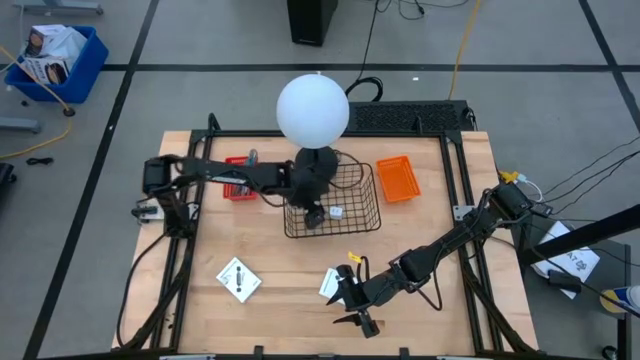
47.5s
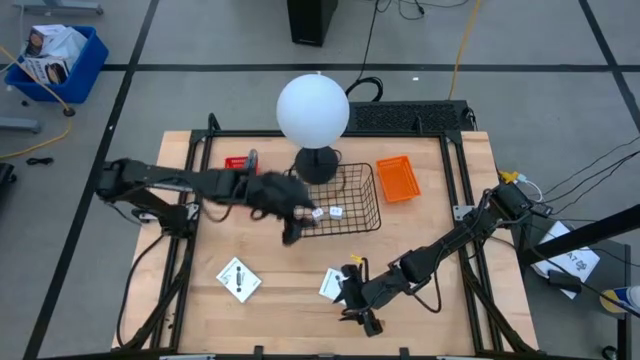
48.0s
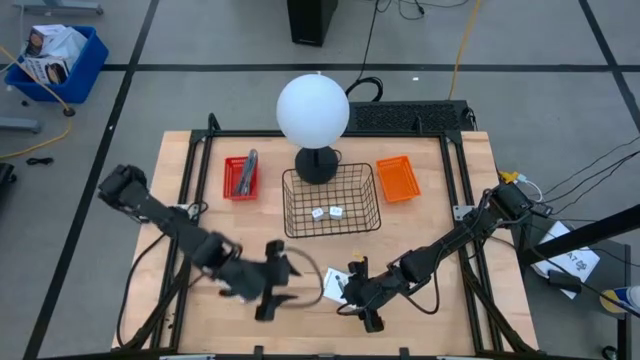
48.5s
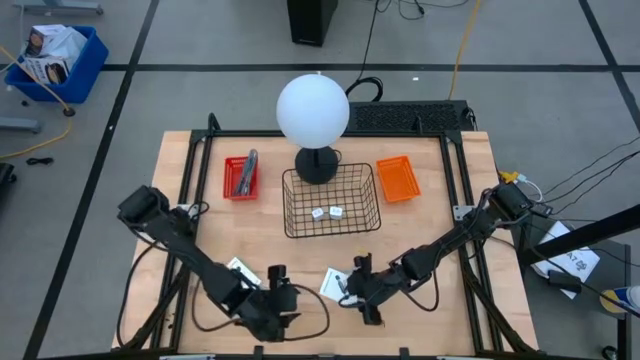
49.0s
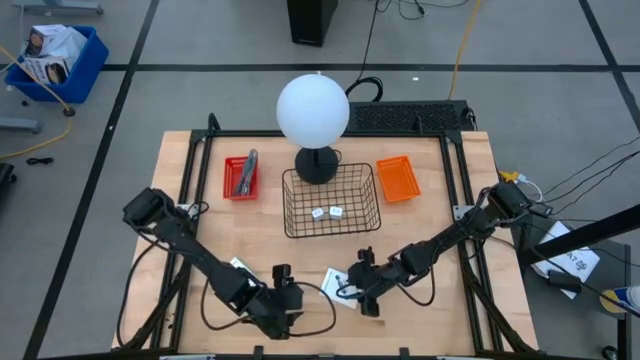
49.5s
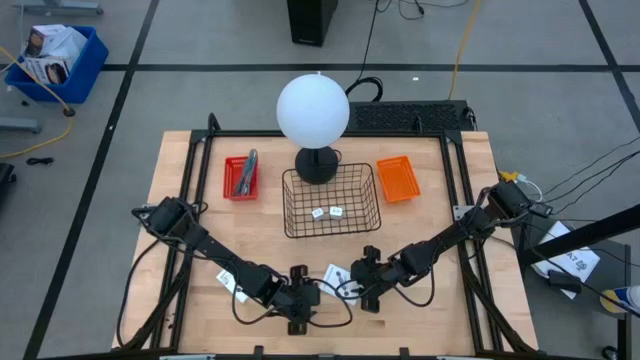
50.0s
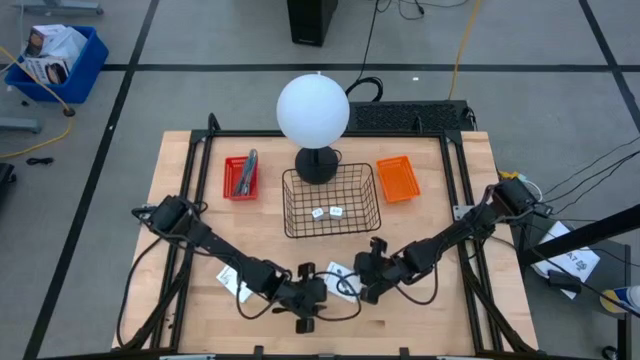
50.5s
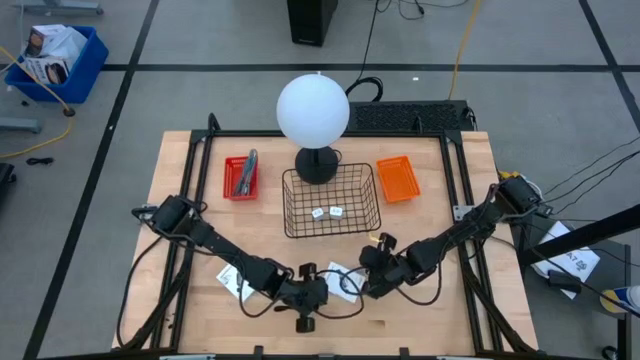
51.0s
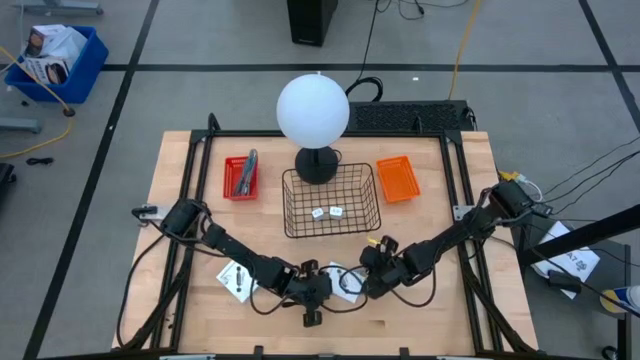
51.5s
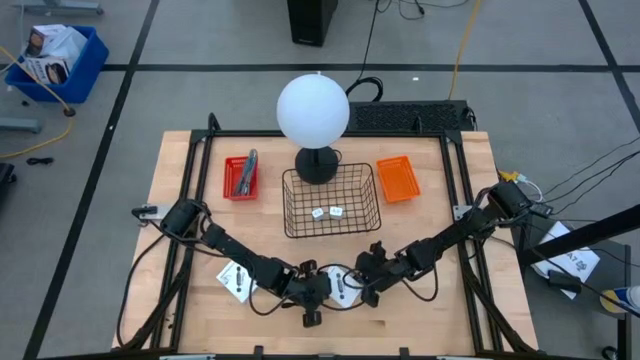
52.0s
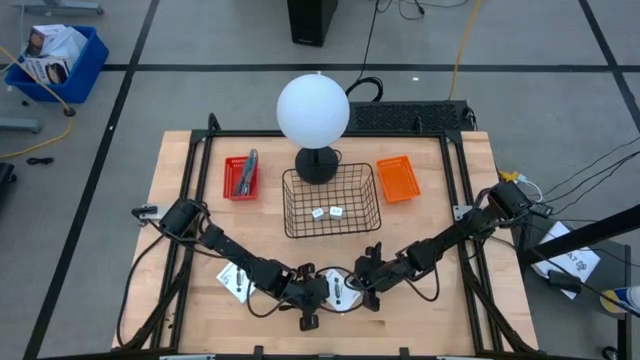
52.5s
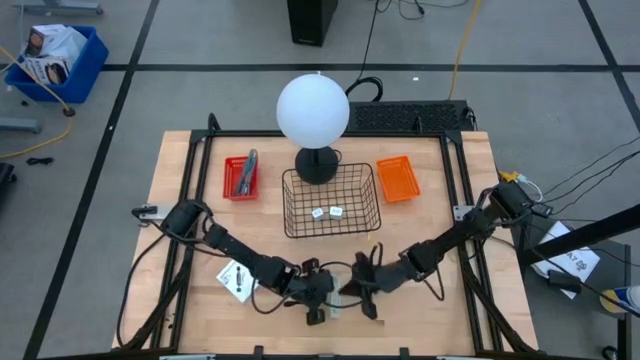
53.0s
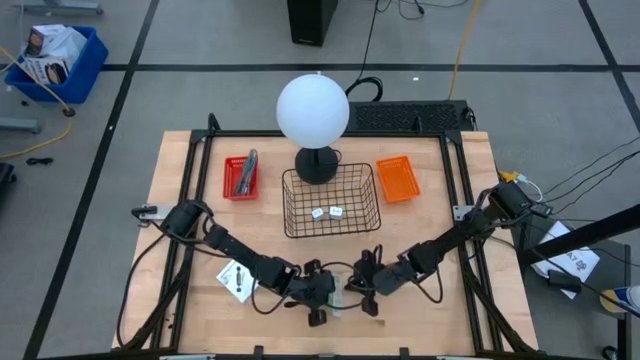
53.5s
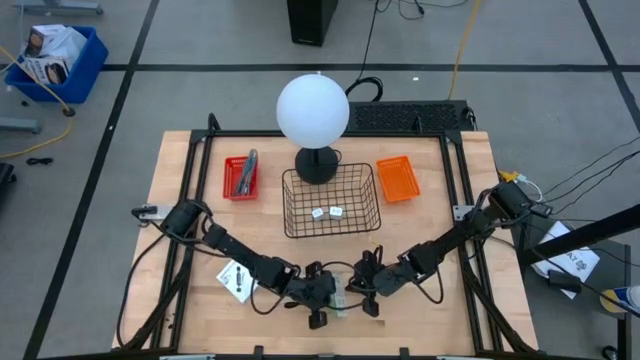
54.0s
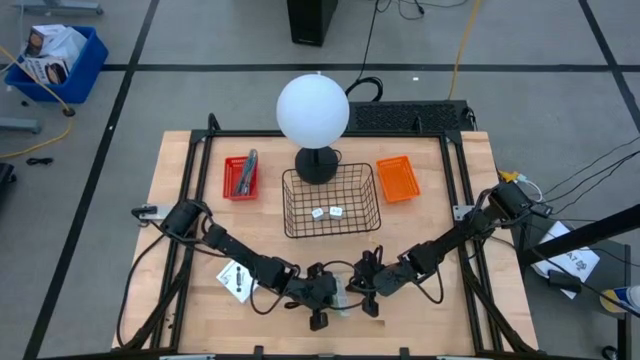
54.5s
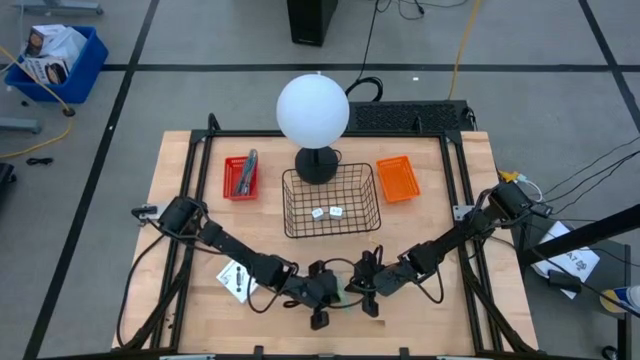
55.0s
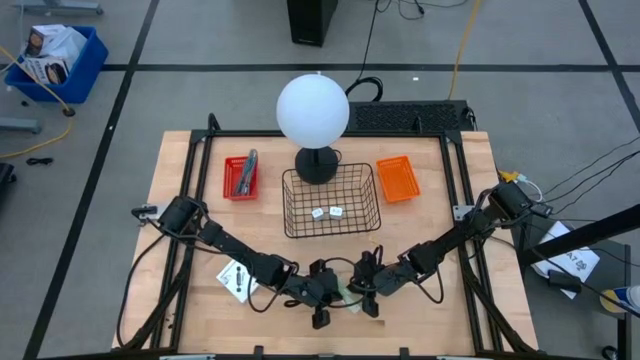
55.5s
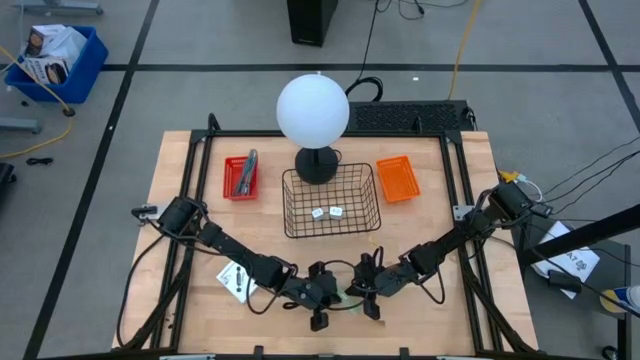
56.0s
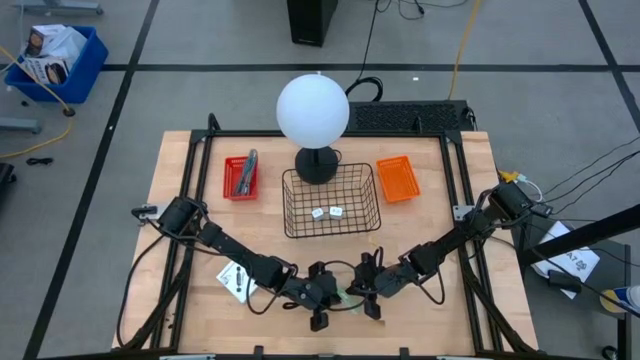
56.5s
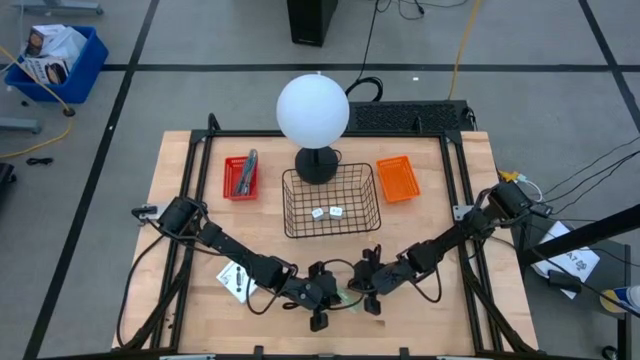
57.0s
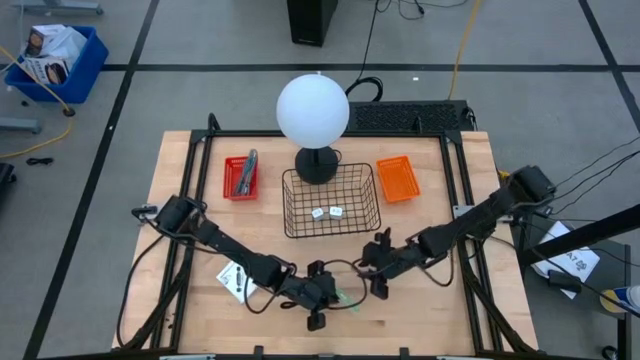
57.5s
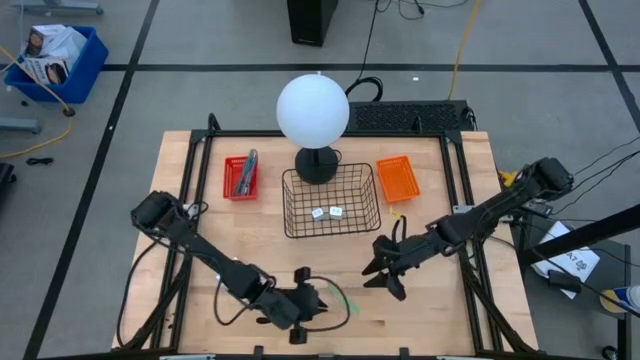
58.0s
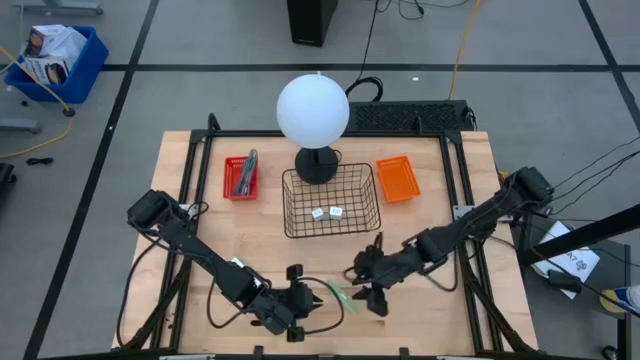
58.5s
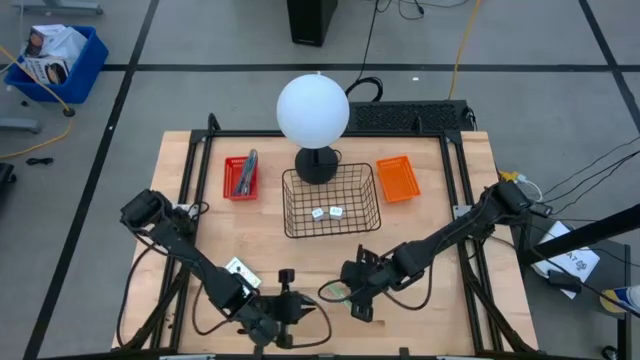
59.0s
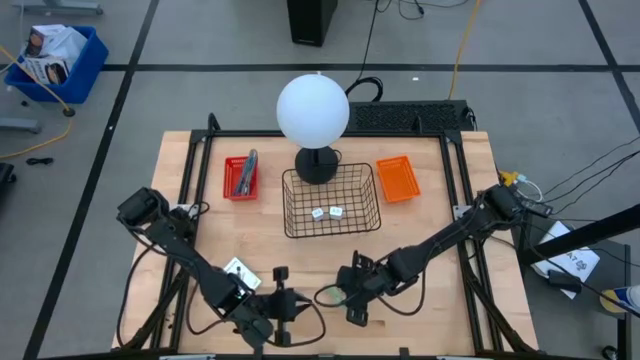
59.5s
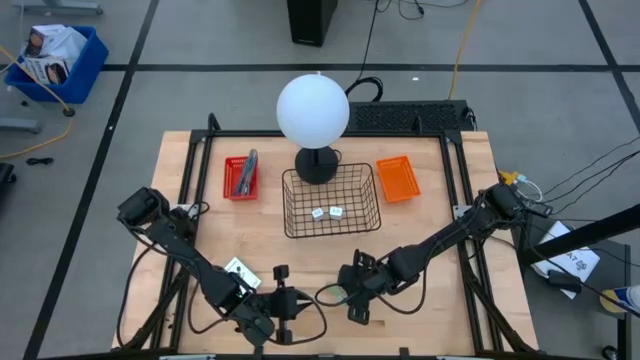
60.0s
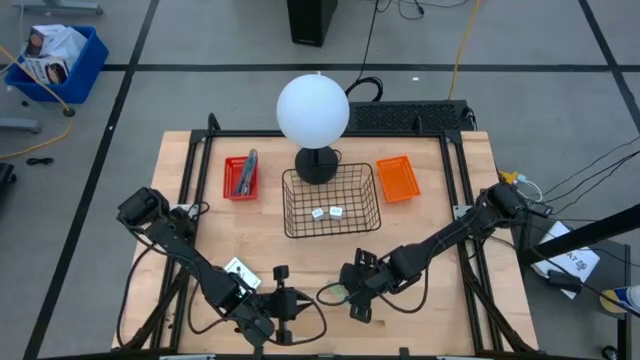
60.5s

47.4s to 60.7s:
Task: Pick and place items into bin
Put the right card reader box into the orange bin

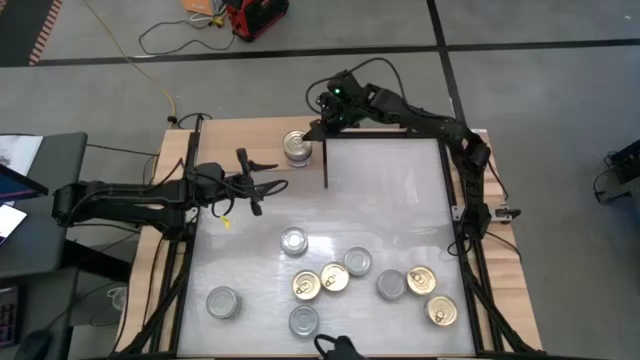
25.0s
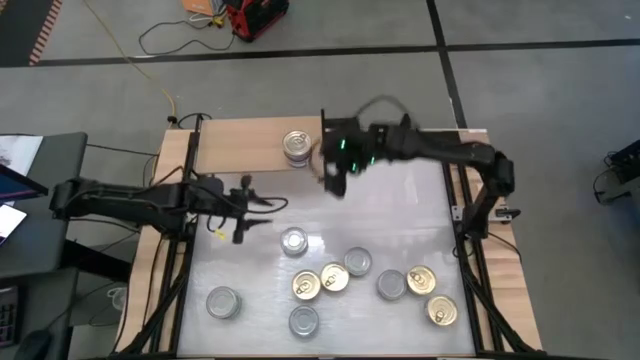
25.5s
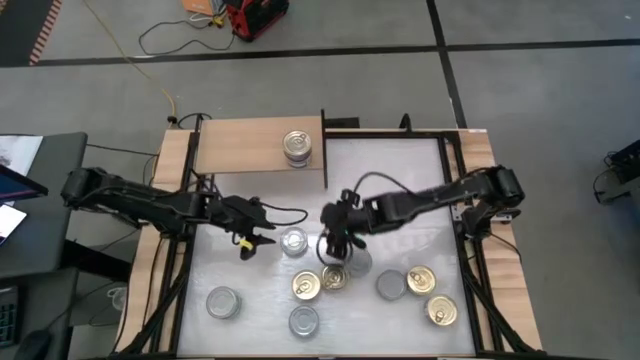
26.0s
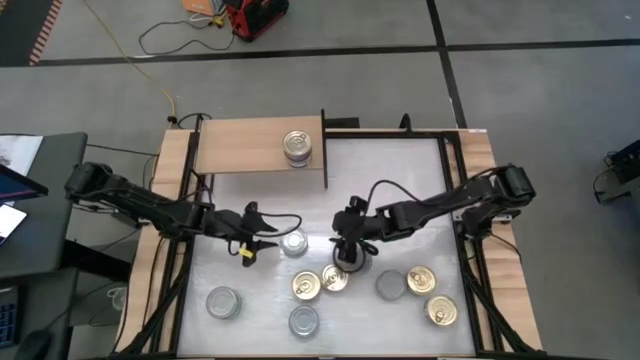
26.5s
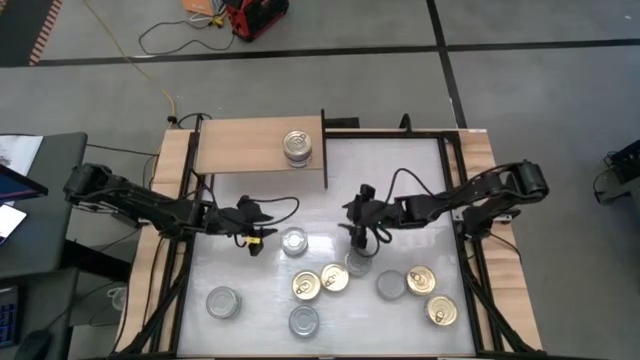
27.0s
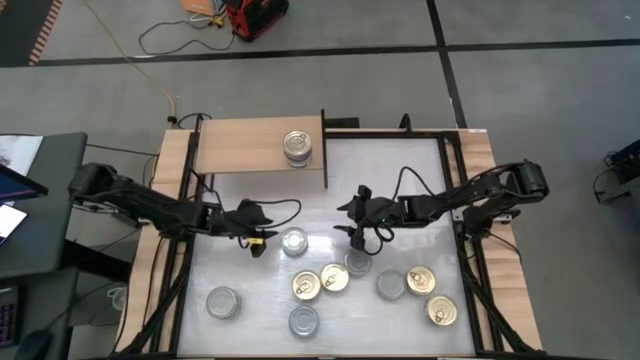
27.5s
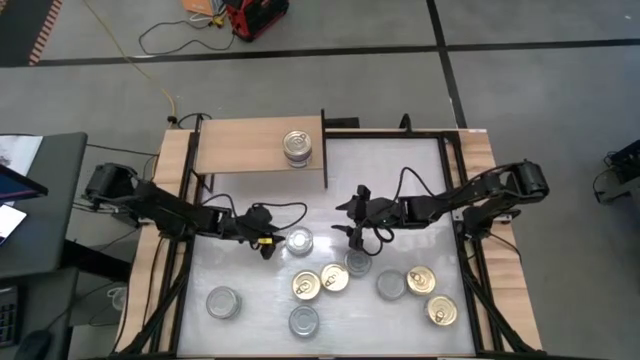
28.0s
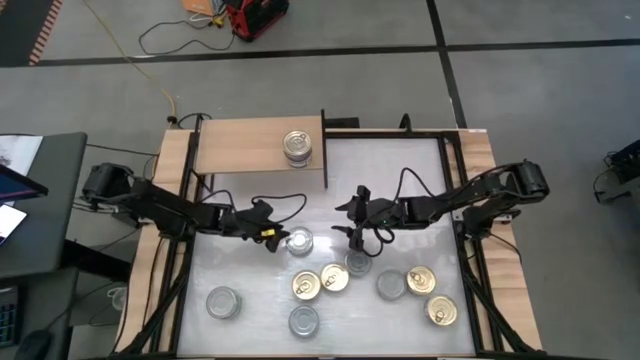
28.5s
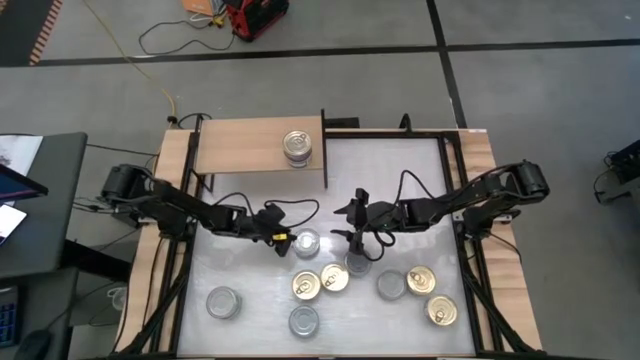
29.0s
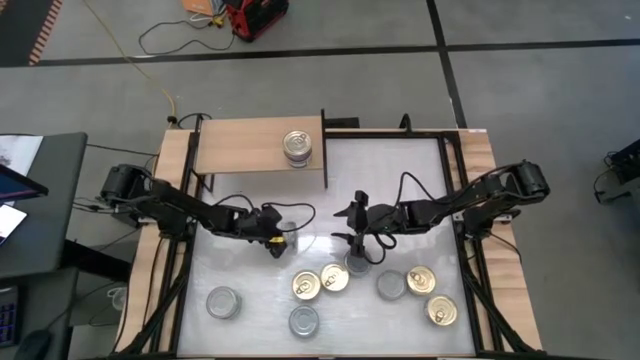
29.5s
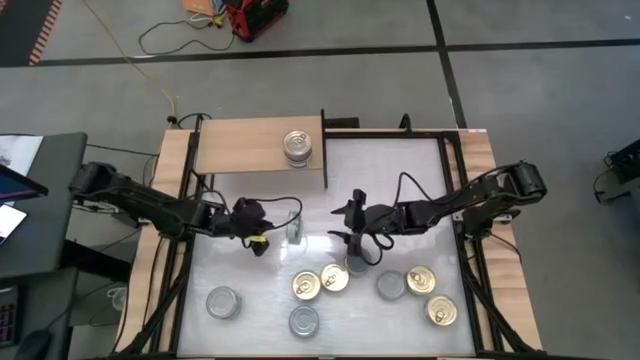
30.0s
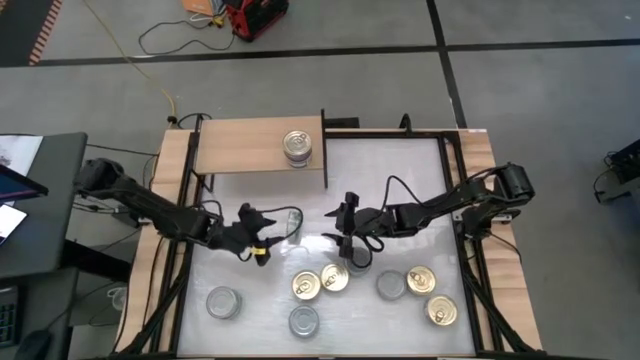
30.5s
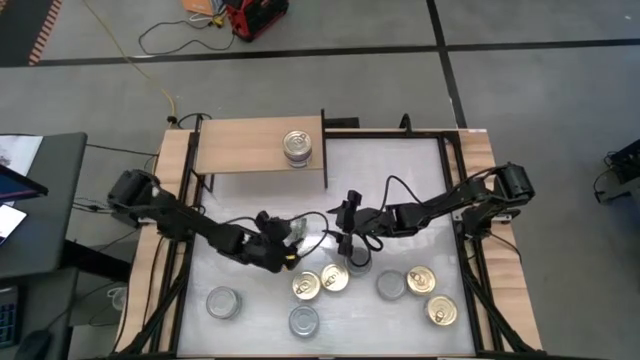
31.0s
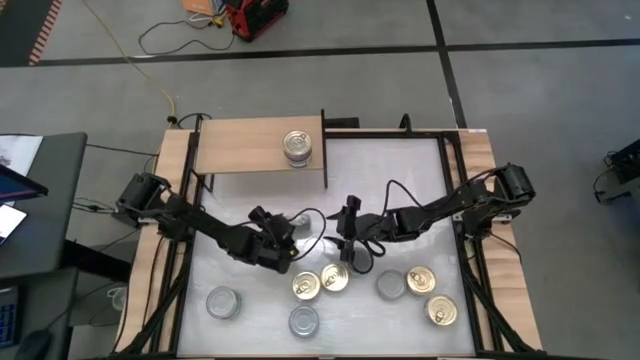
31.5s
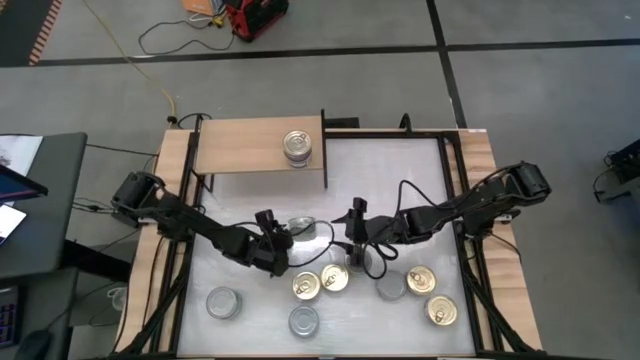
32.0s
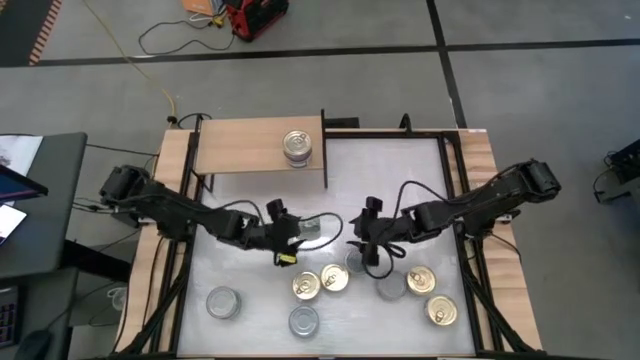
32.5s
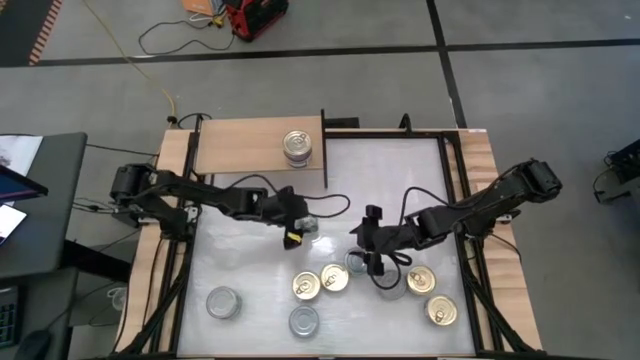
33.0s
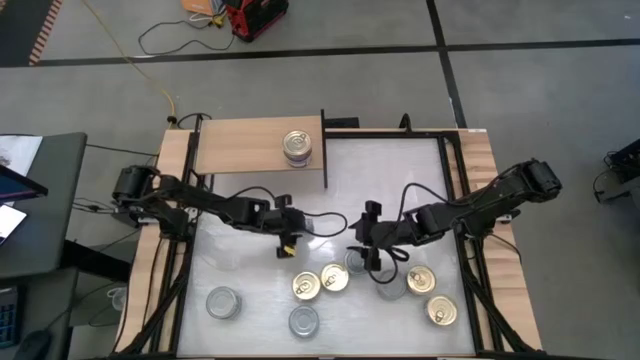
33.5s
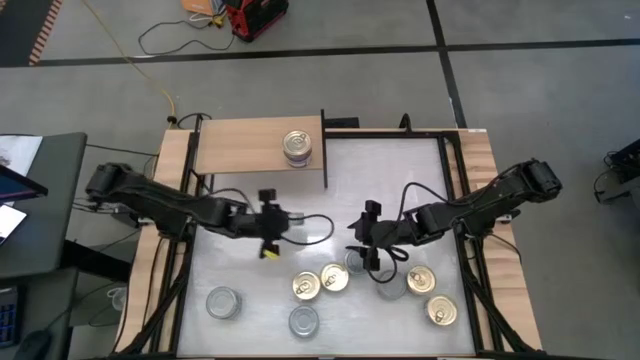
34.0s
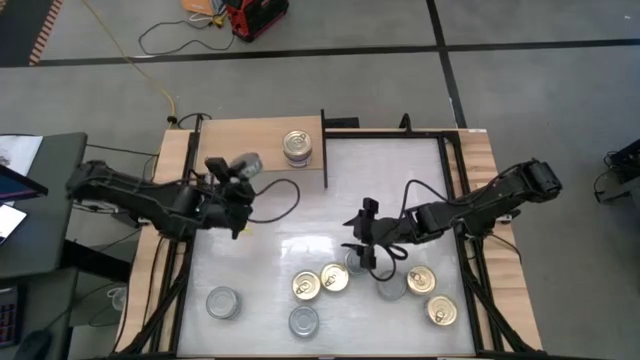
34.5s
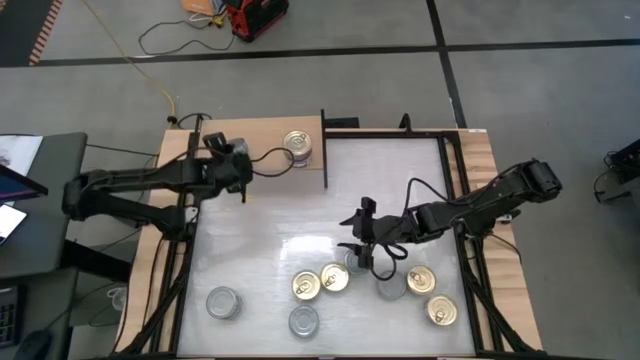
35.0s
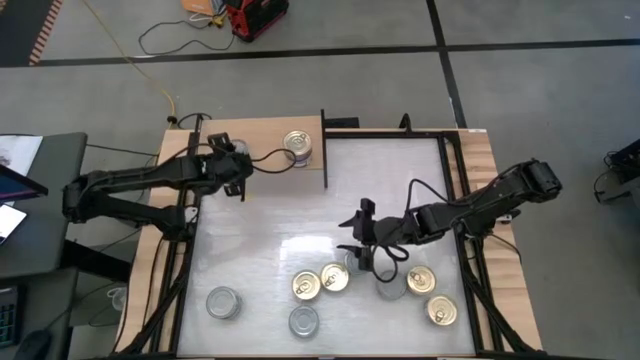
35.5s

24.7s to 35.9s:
Task: Stack canned seafood by type on shelf
Put the green-white tuna can on the shelf
